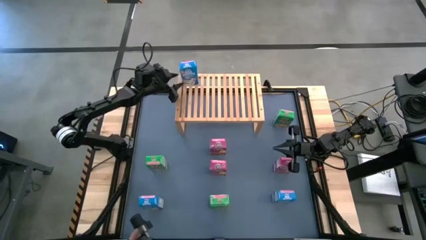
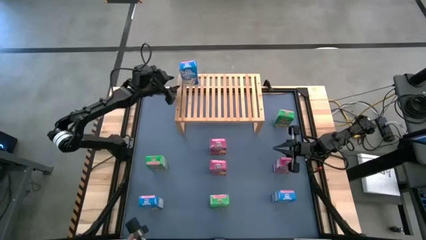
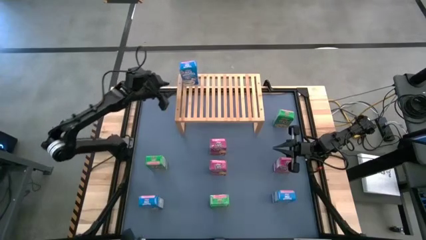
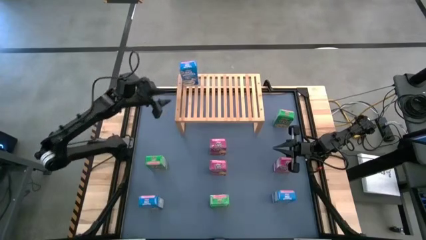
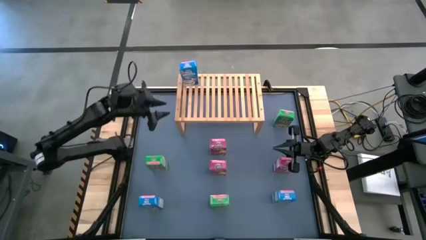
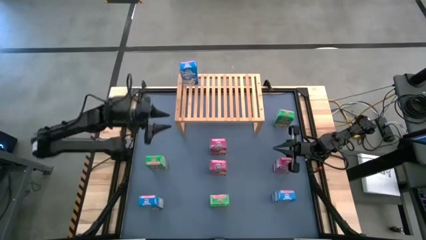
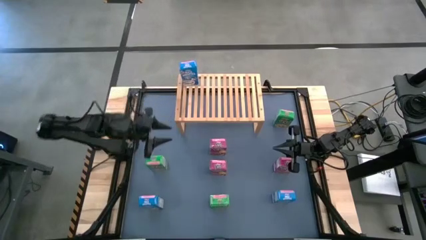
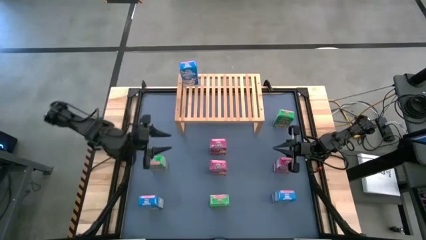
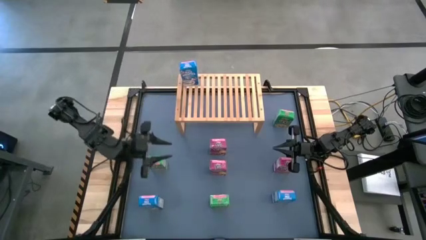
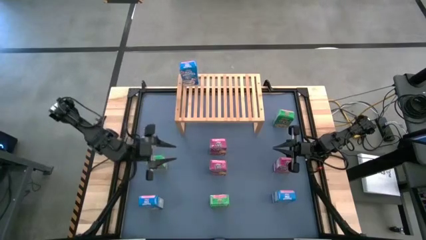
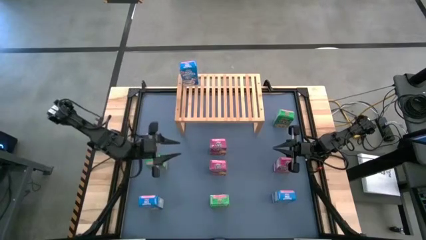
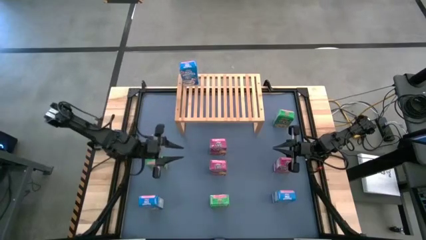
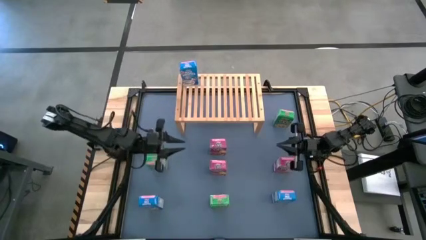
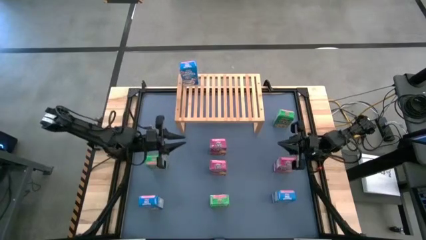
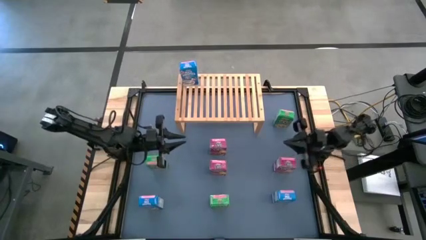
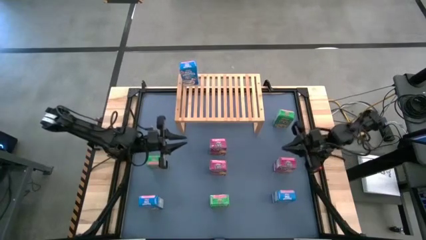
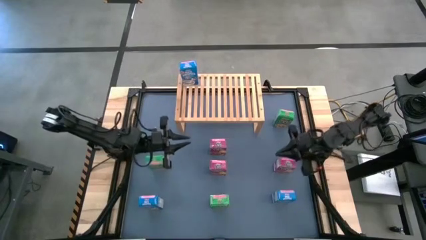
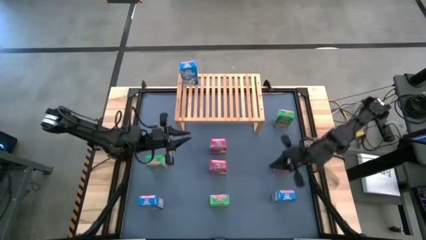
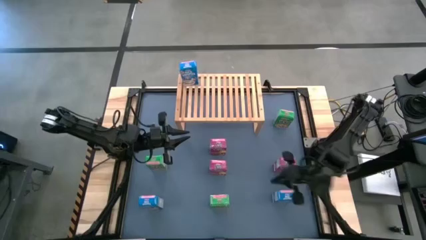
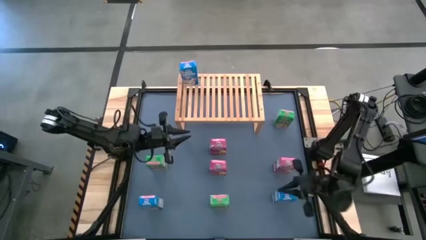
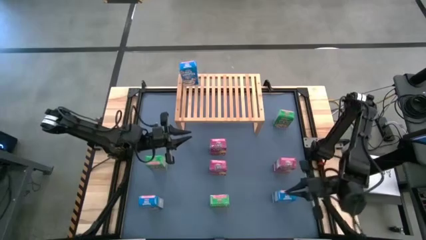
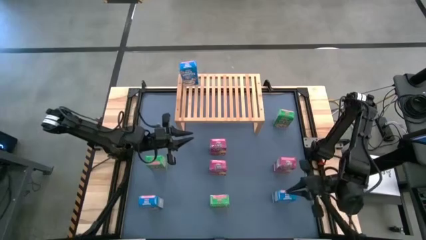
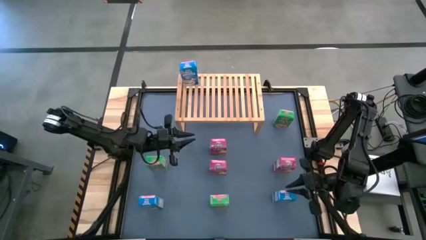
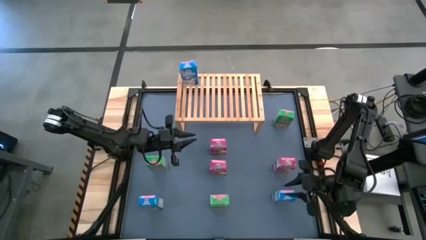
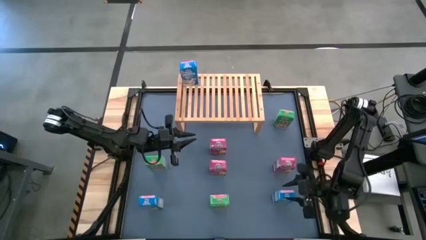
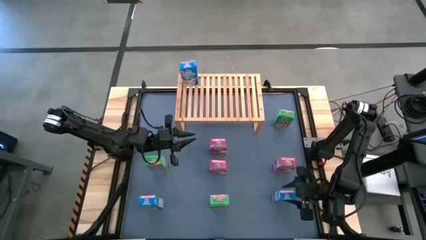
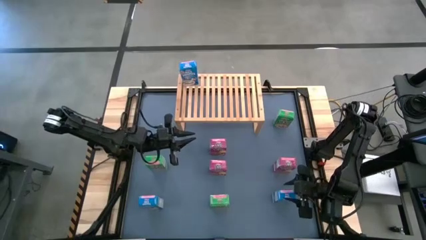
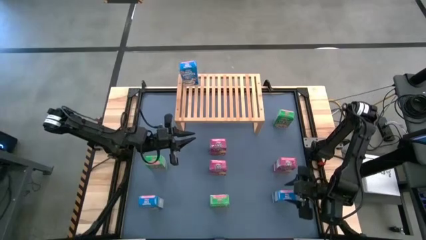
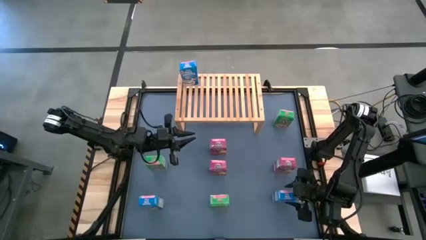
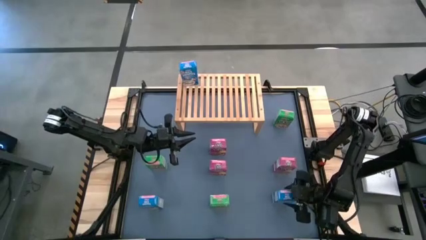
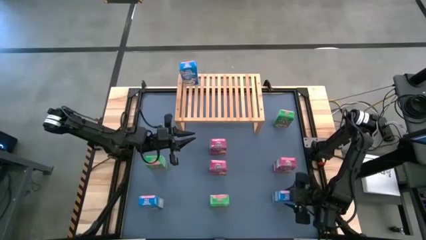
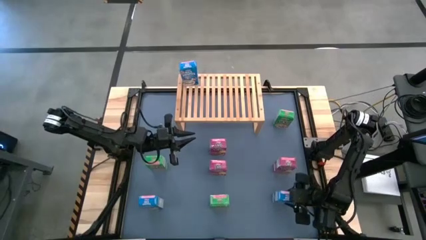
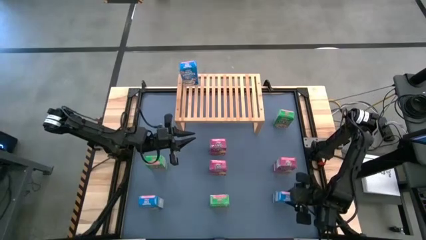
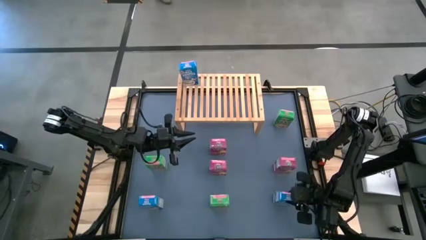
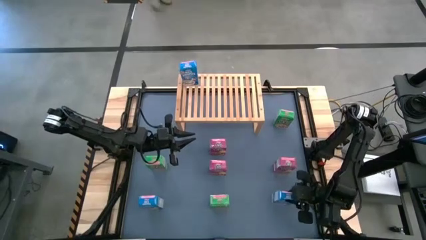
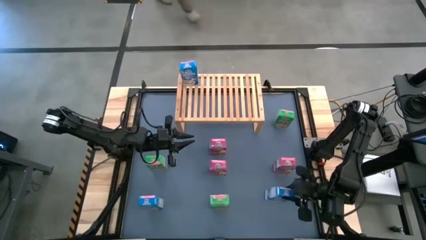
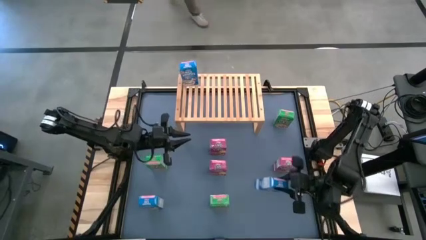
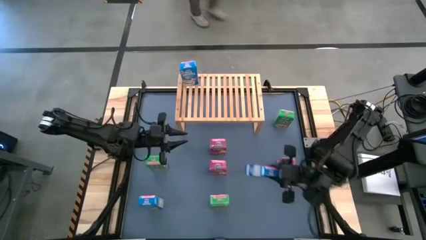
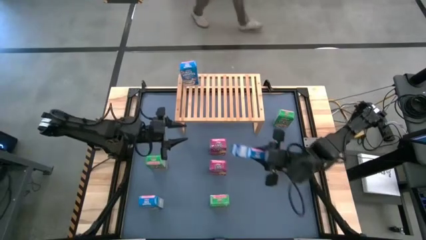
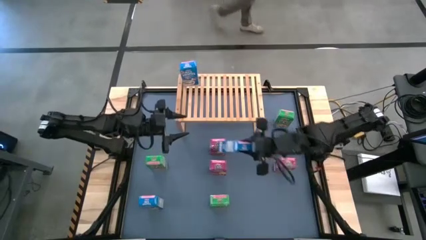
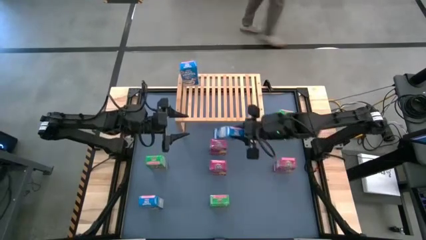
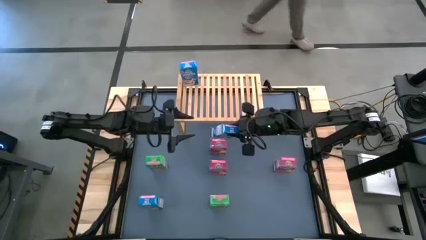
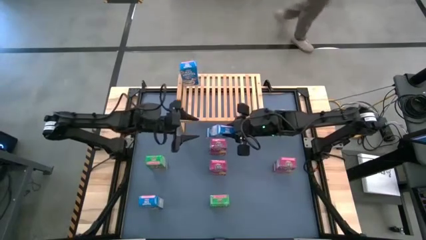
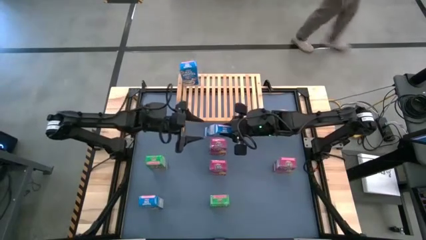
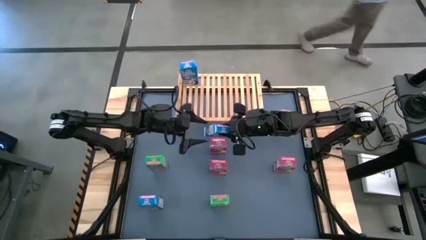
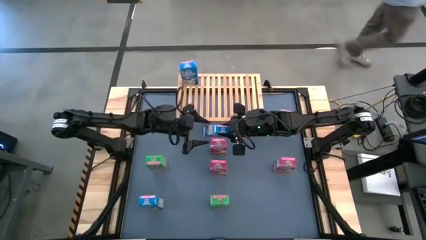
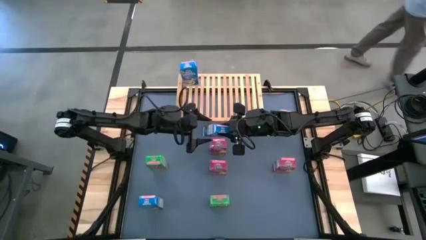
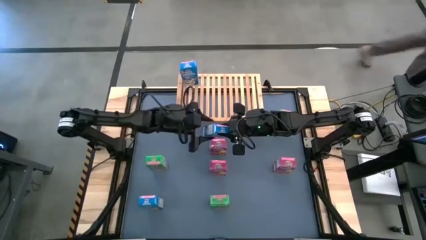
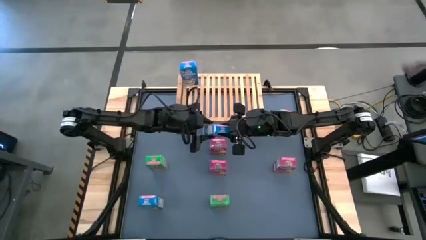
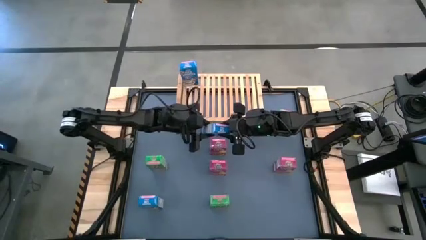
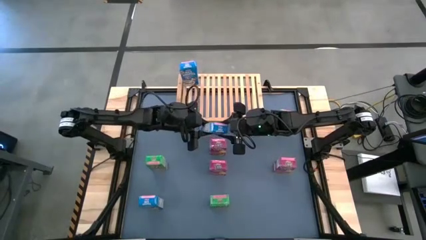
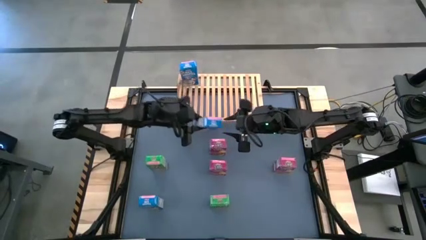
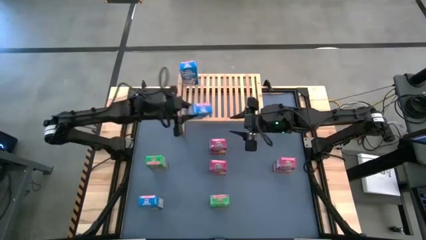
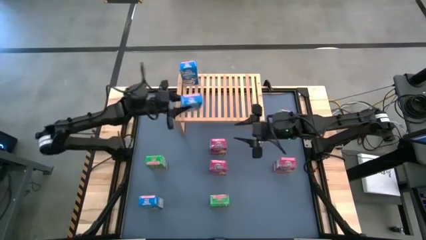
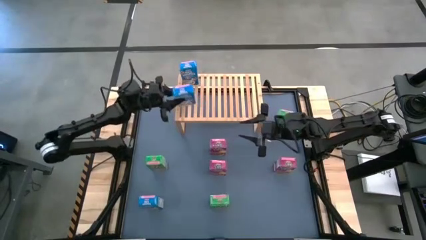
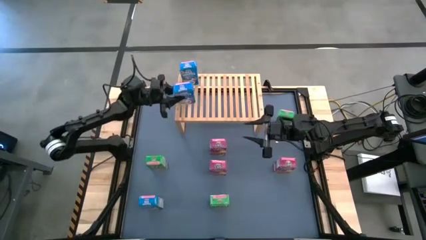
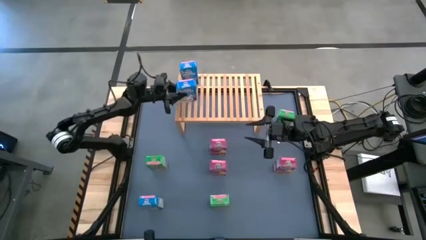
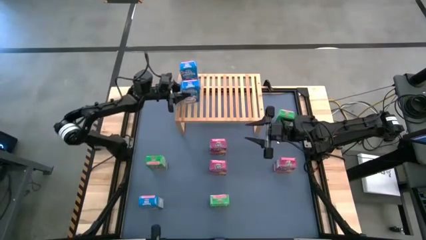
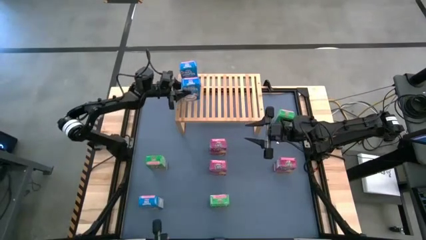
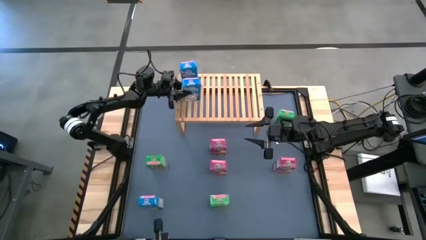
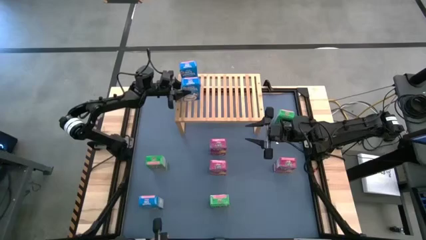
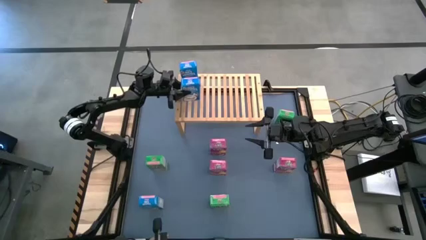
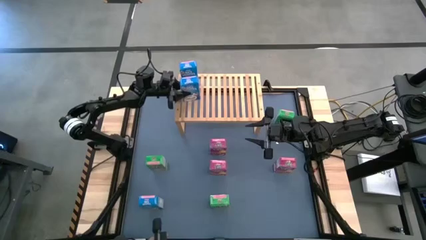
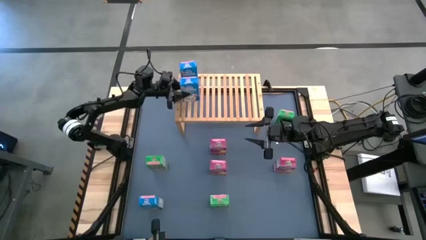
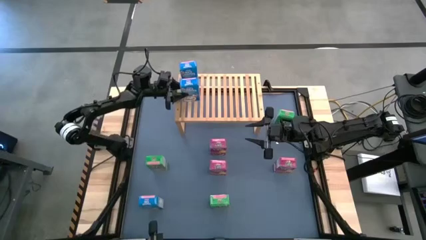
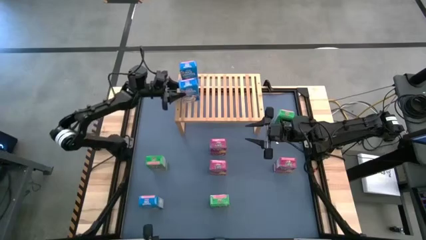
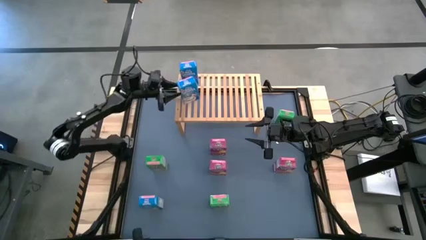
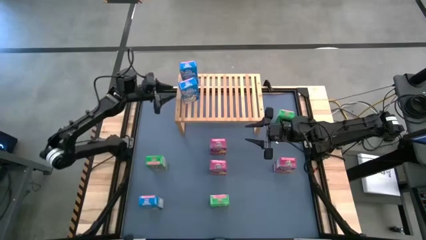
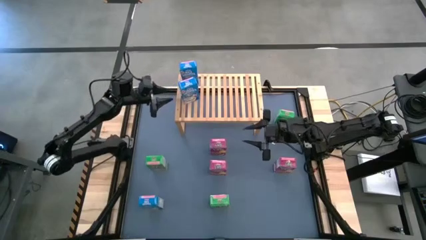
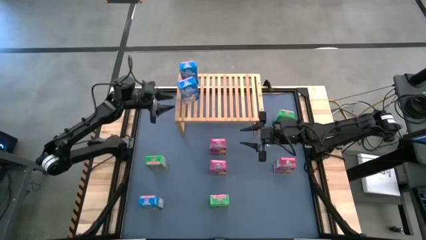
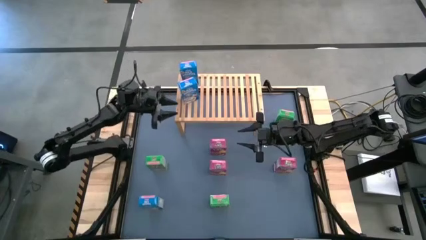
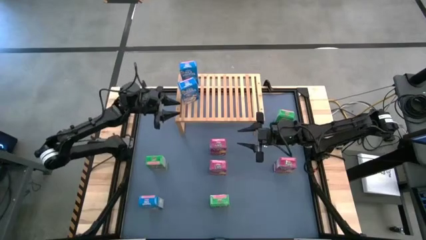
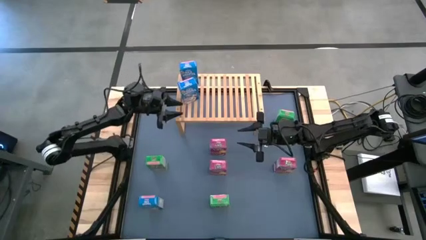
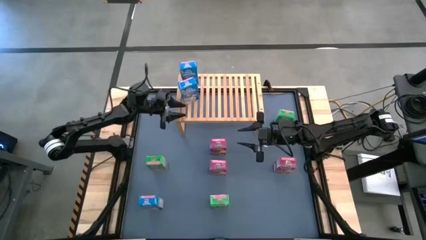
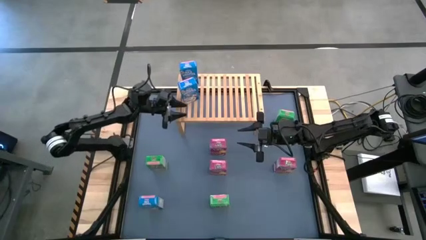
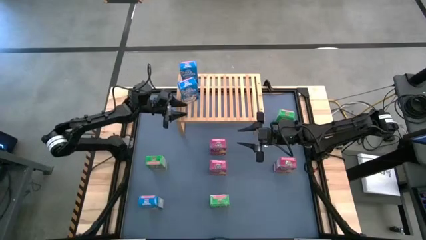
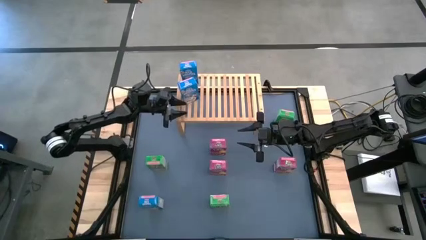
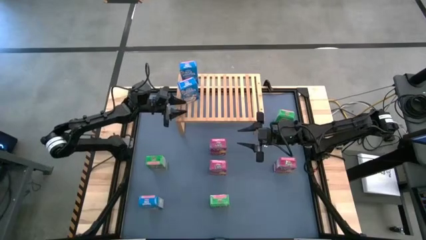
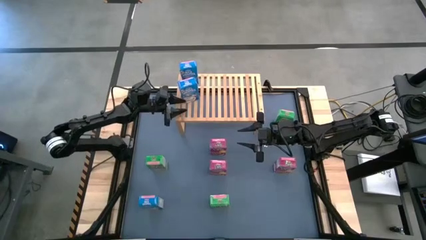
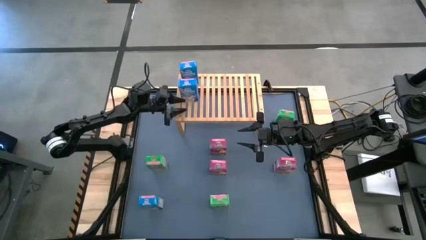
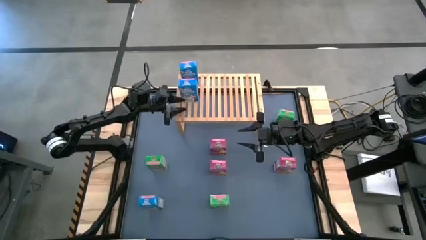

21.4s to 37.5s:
Task: Stack cereal on shelf
Put the right blue cereal box on the shelf aligned with the other blue cereal box

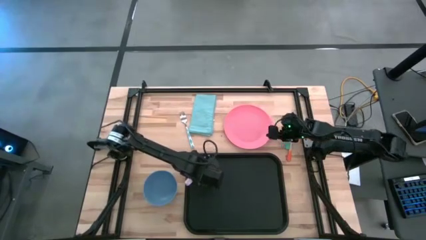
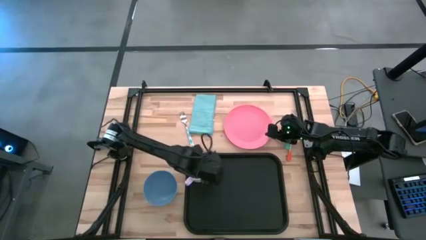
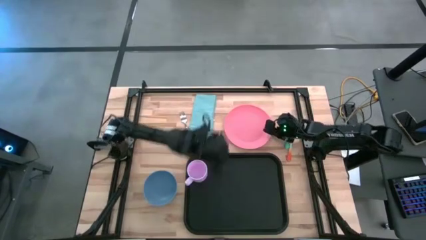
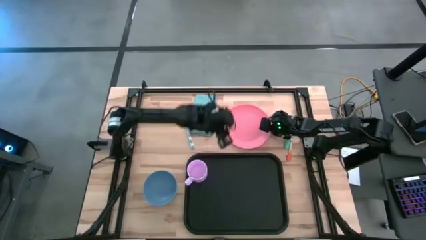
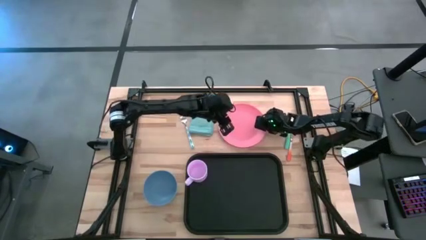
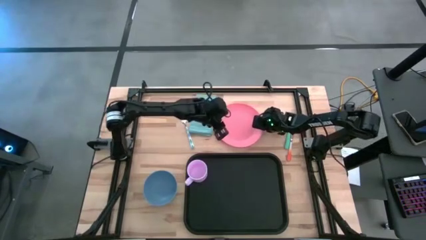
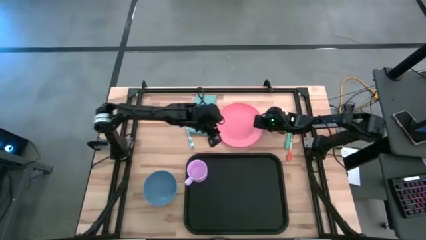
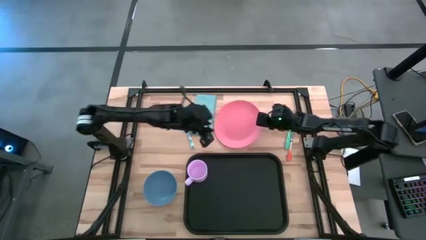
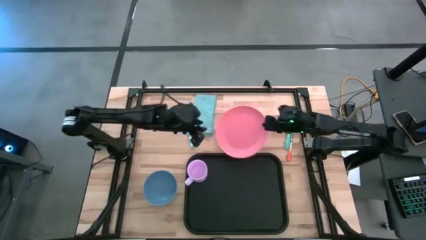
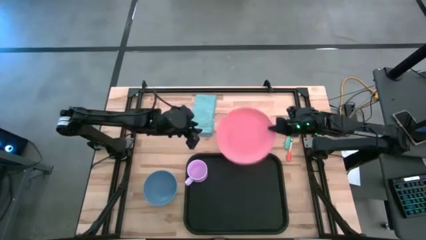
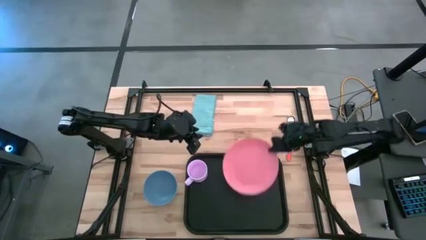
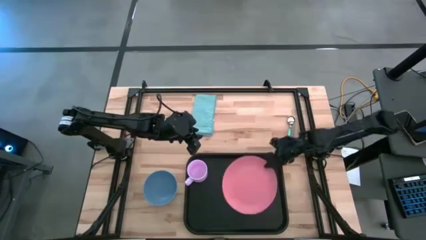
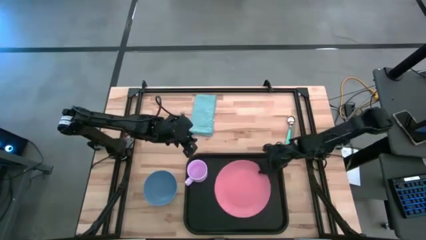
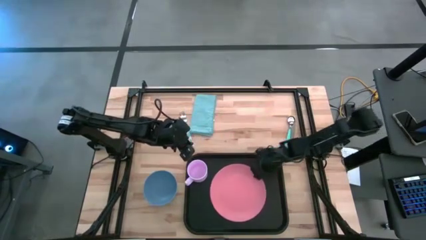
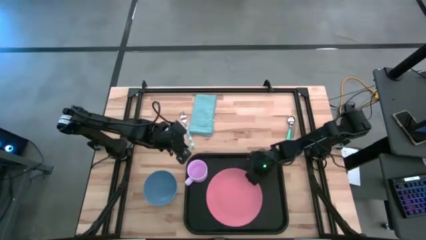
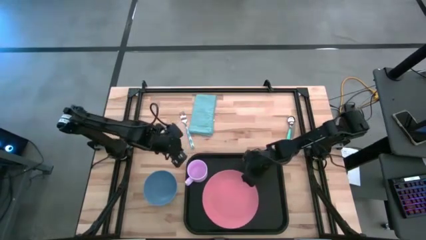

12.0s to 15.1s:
Task: Set up tray
Put the pink plate on the black serving tray to the bottom right of the pink cup
